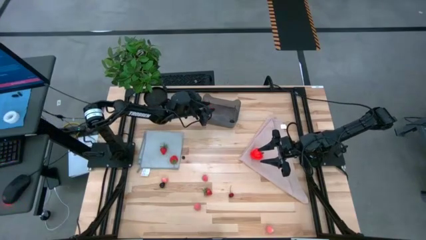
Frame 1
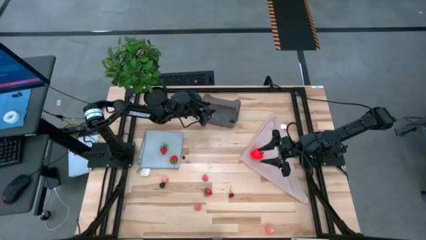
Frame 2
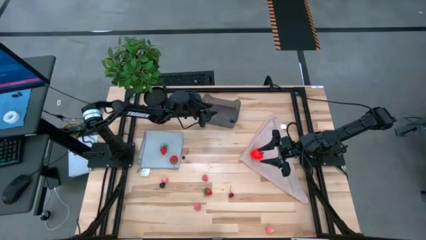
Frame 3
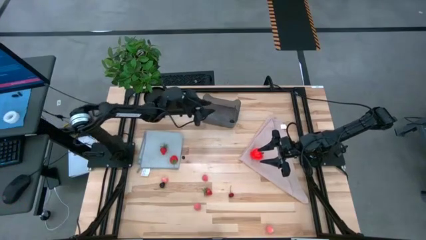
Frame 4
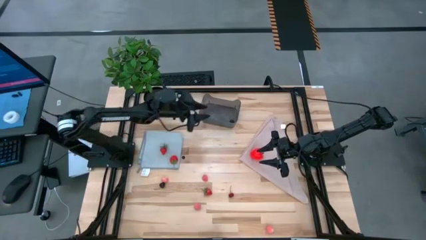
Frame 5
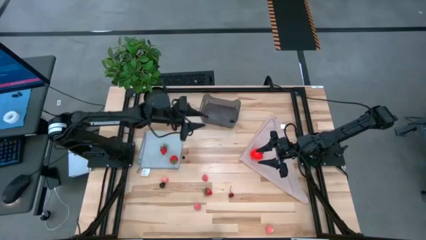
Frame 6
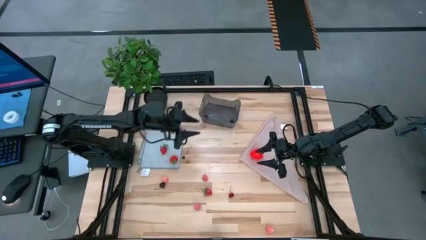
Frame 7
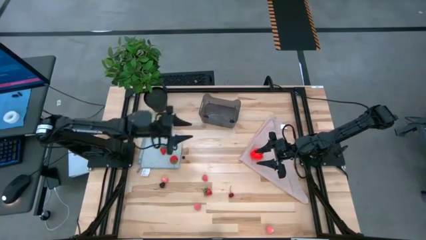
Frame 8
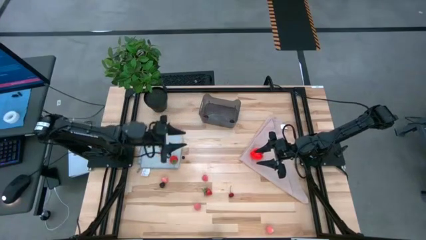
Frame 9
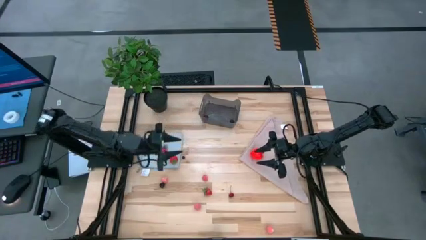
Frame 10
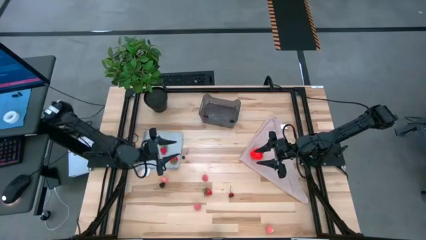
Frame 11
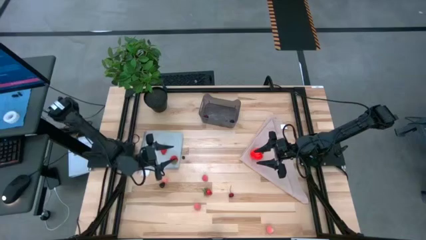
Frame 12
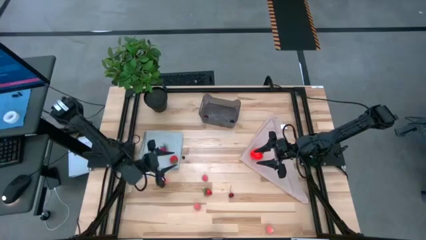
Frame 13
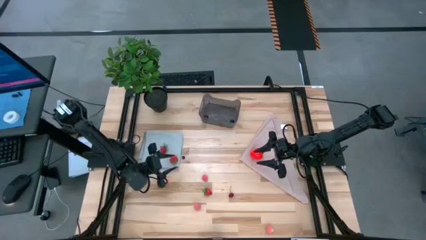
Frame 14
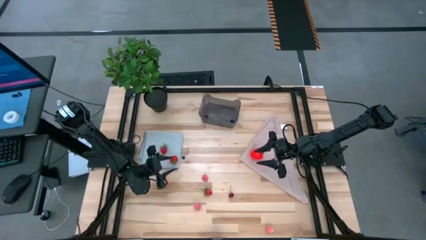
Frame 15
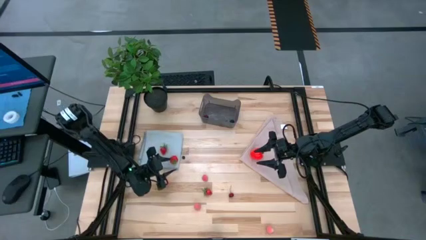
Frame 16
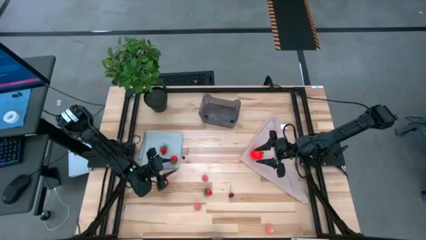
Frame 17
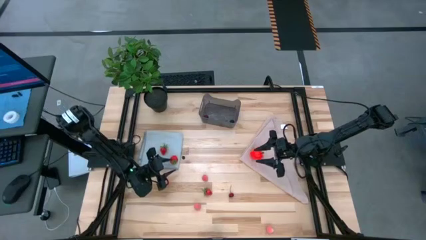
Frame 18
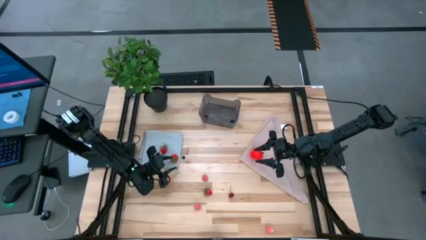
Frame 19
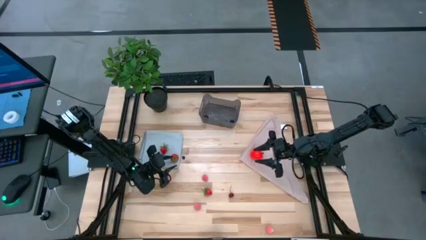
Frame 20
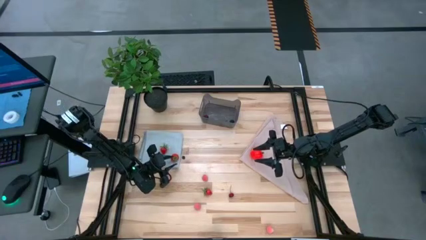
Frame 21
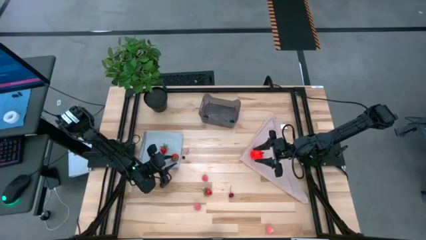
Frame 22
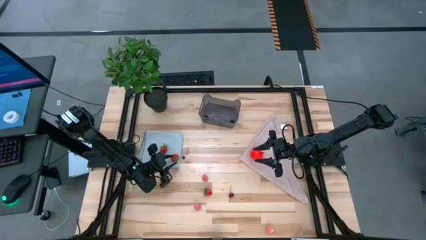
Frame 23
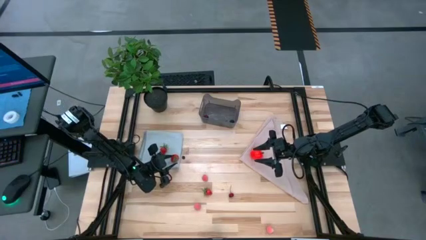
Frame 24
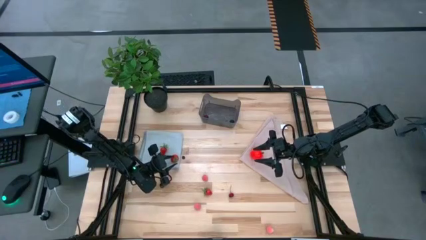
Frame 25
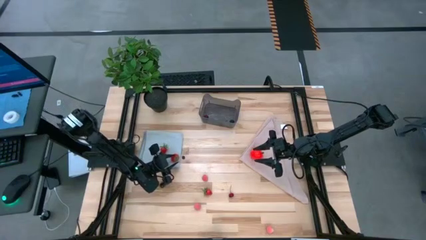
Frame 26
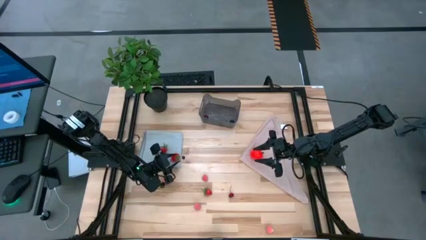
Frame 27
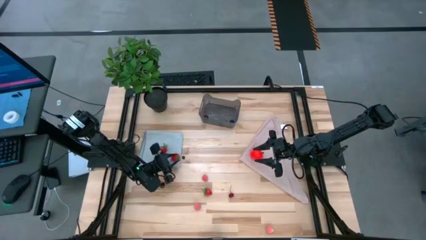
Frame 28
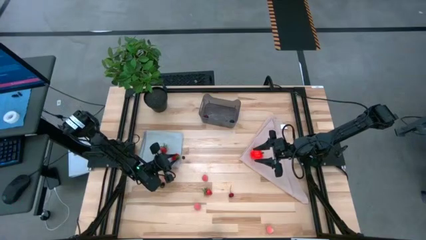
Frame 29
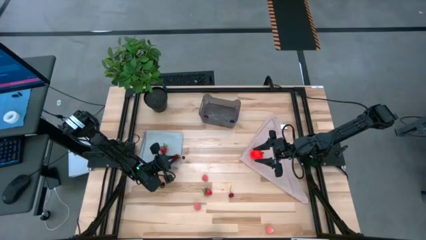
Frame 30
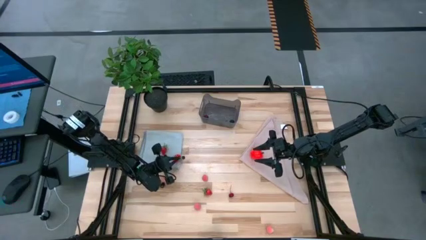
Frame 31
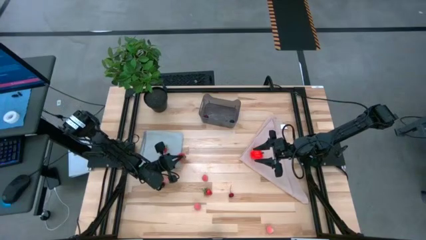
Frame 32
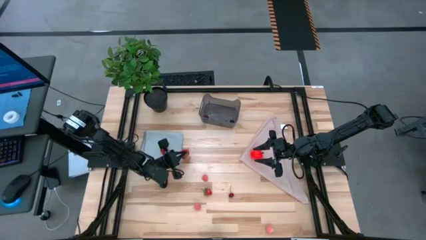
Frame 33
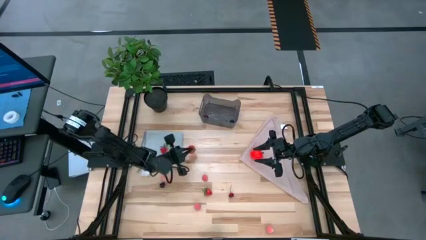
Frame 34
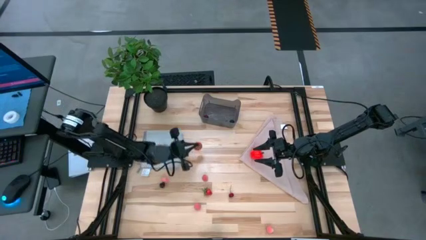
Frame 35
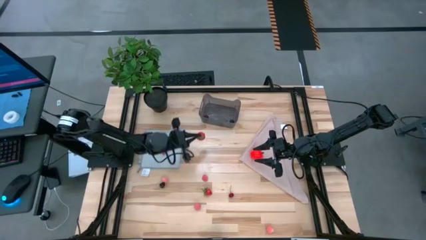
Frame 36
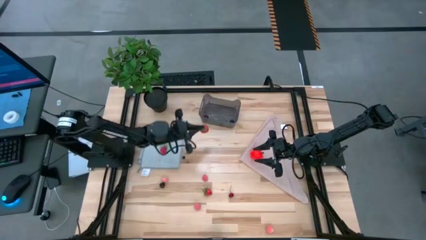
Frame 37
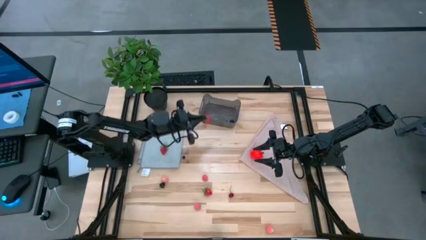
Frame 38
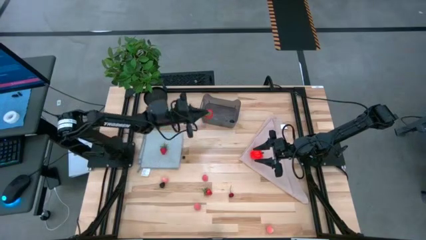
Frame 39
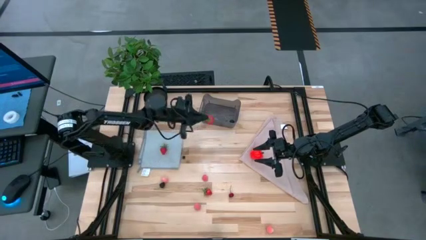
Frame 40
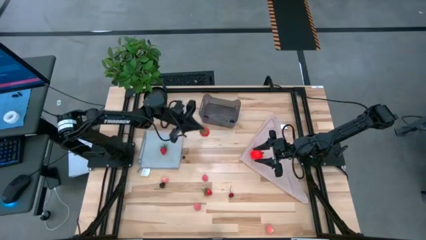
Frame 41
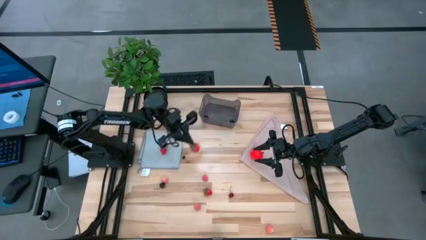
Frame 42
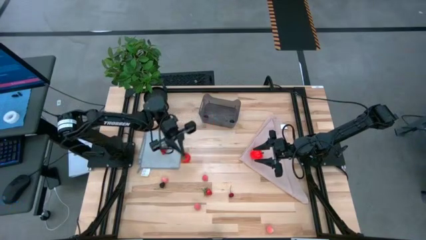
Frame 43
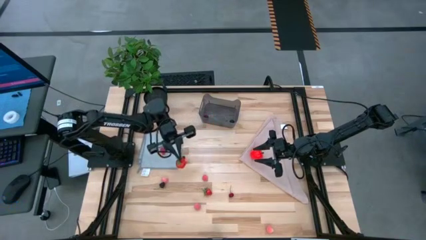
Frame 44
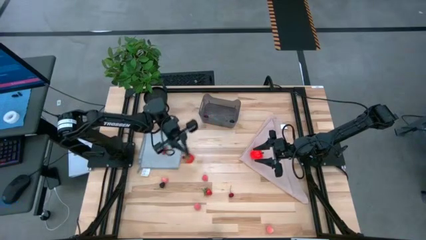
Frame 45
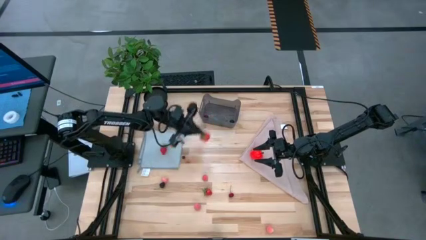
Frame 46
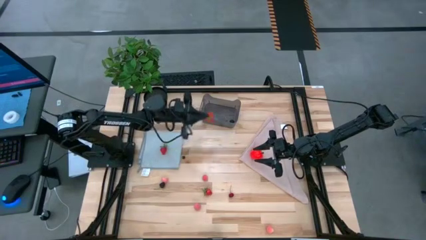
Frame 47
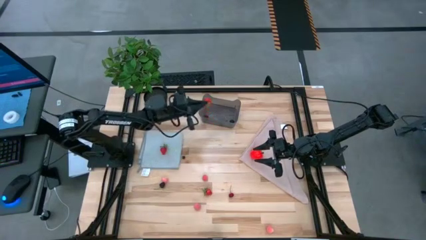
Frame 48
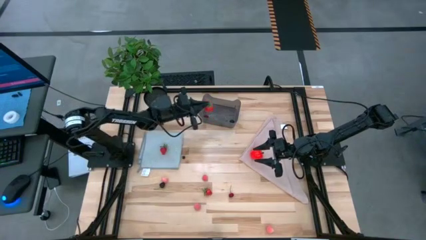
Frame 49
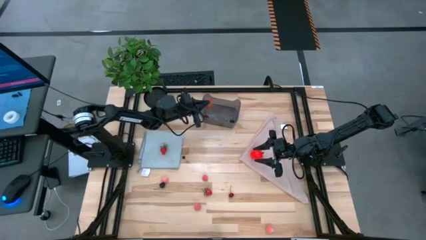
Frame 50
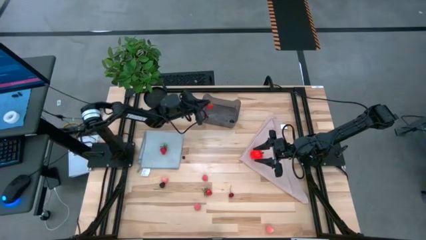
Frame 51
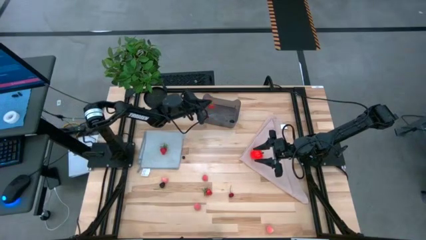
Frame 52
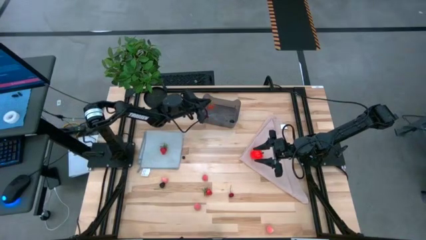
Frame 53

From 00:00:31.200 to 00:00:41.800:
Task: Pick and placing Produce into tupperware
Put the strawberry into the black bin

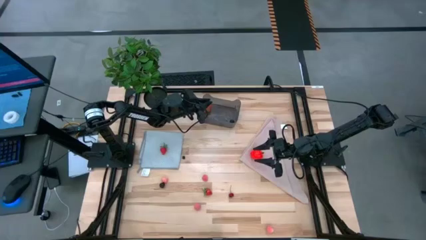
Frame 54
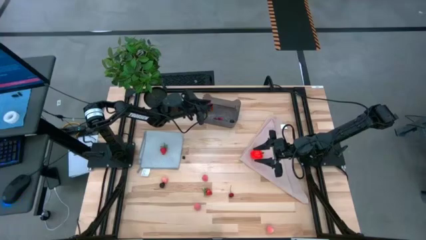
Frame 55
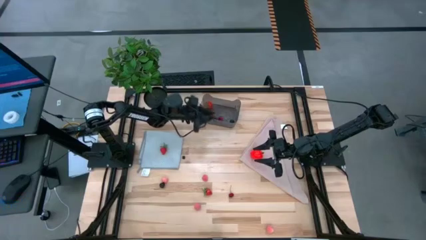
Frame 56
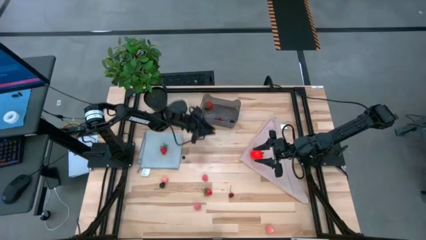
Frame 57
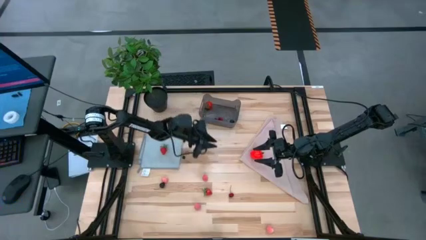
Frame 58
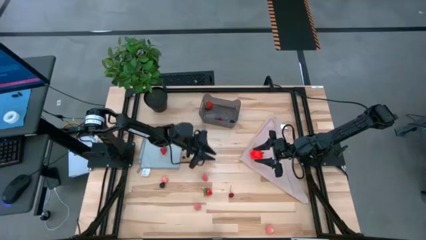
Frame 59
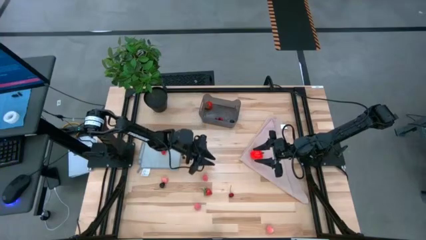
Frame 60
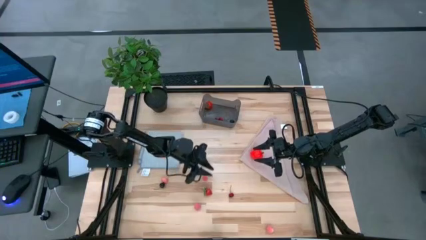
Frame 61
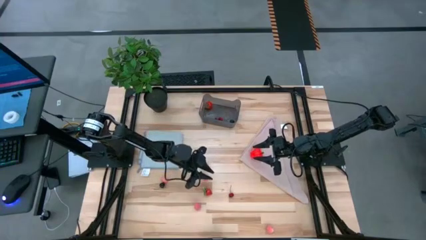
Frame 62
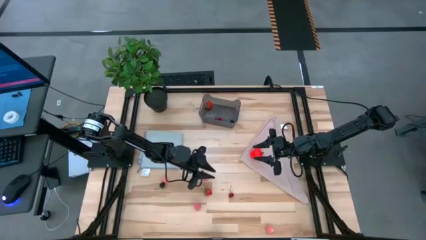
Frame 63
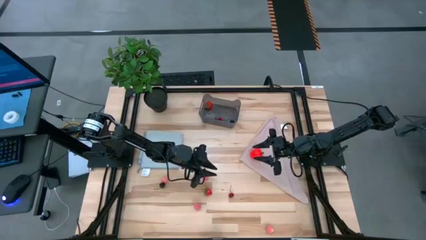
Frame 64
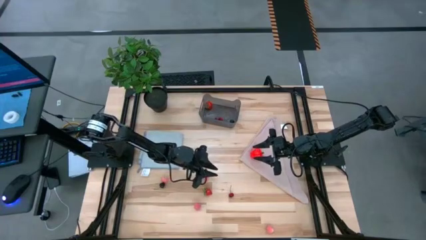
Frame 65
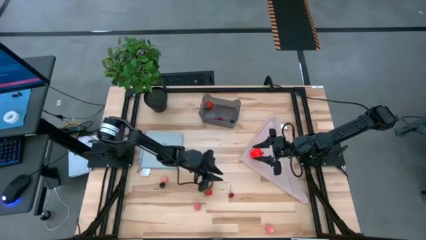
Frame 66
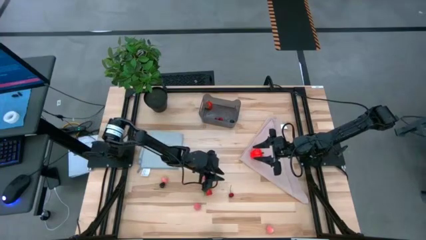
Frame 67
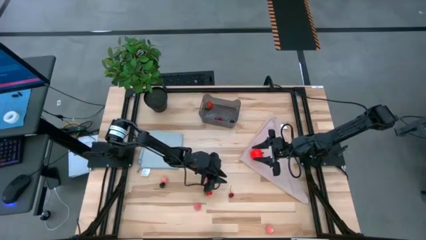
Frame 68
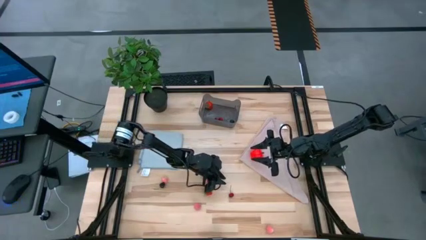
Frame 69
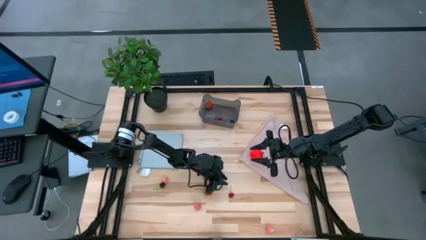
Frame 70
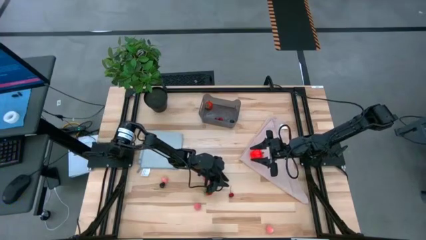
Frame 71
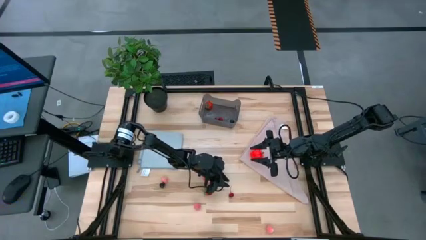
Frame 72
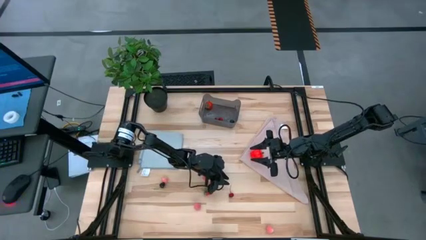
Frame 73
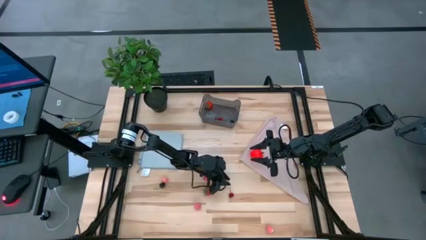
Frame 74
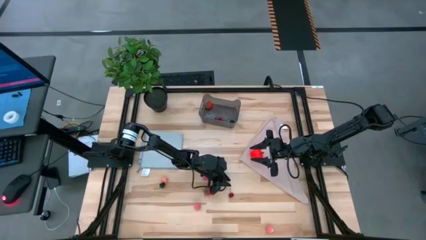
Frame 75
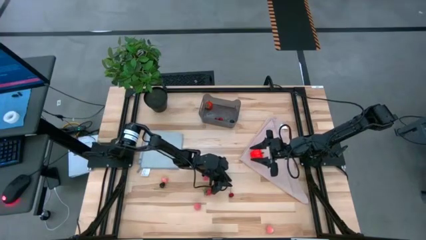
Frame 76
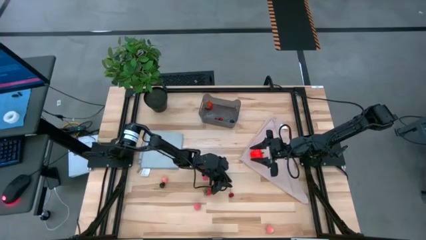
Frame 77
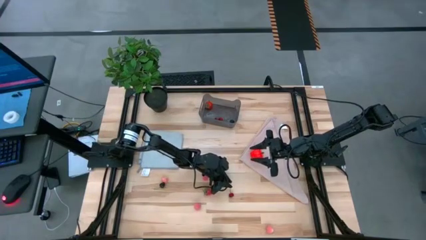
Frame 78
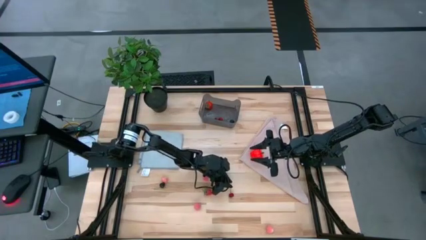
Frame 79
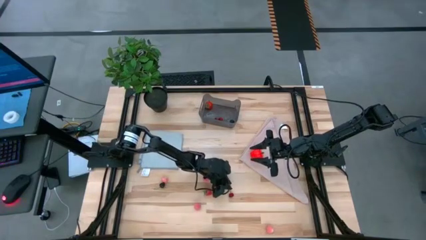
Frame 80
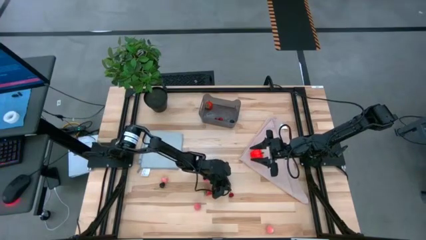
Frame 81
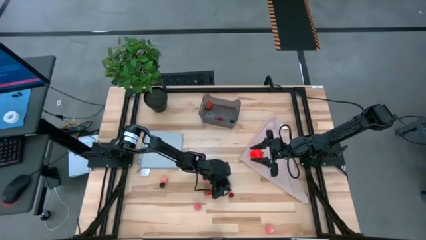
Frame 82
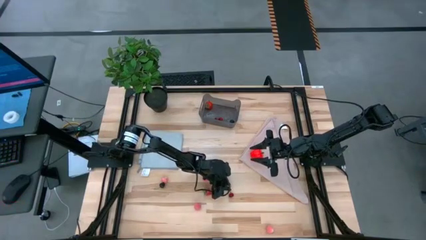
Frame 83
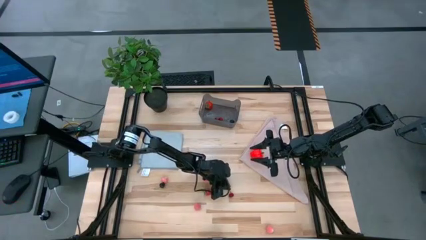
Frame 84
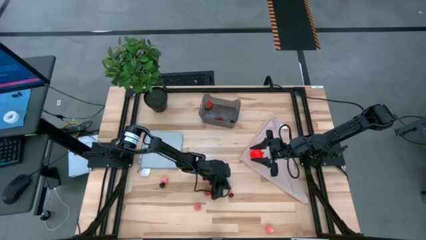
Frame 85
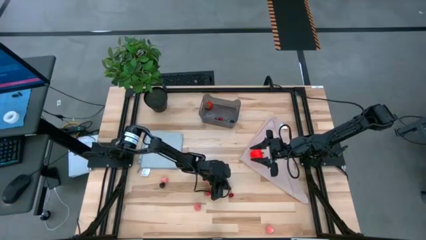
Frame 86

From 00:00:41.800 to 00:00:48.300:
Put the red cherry into the black bin
